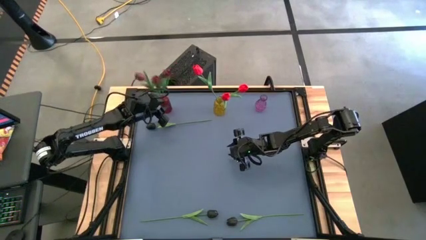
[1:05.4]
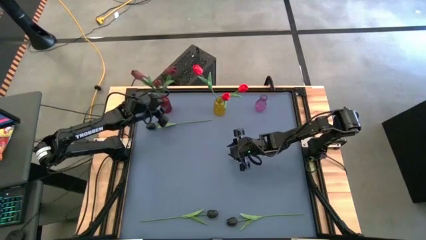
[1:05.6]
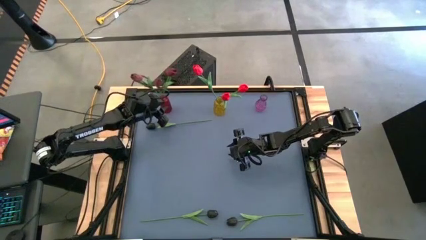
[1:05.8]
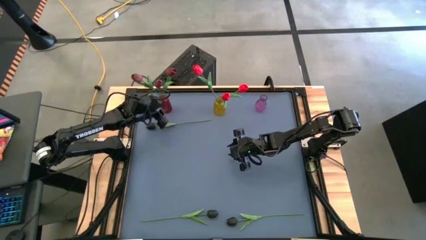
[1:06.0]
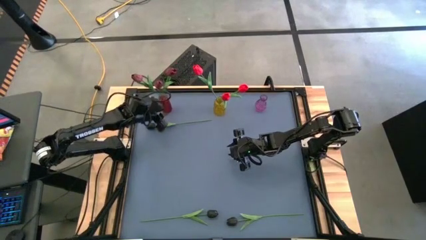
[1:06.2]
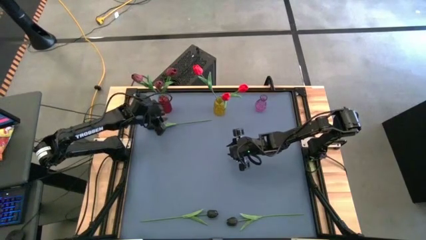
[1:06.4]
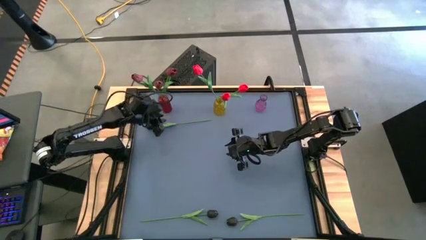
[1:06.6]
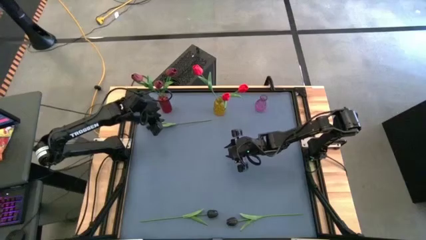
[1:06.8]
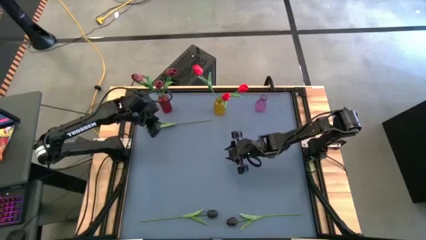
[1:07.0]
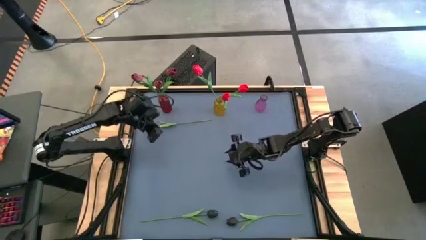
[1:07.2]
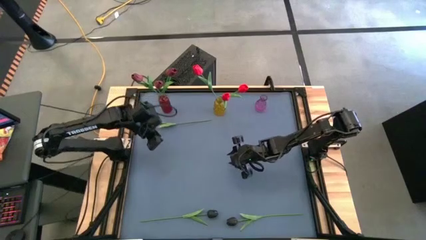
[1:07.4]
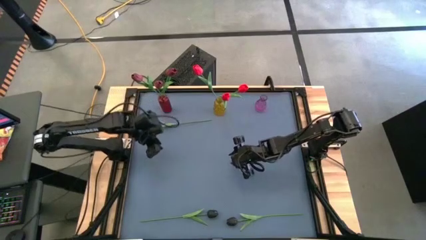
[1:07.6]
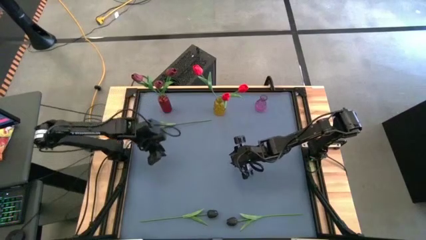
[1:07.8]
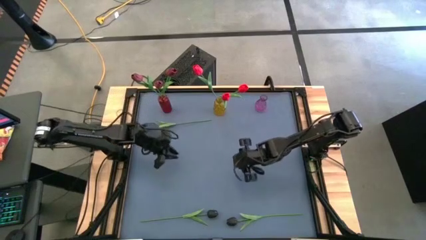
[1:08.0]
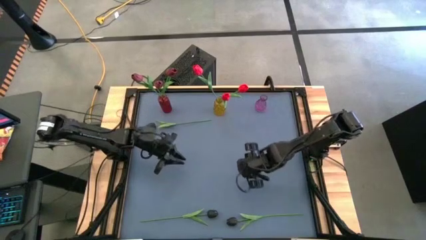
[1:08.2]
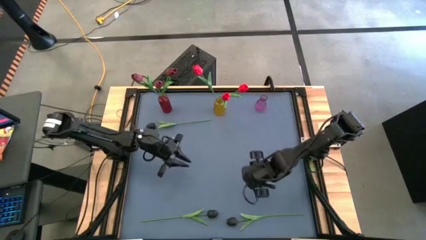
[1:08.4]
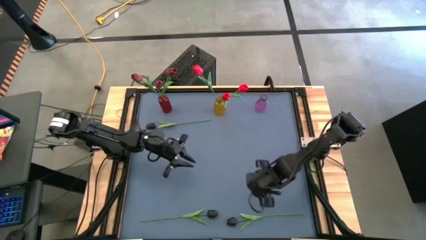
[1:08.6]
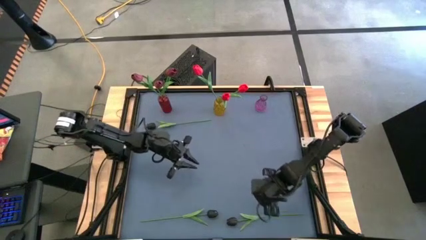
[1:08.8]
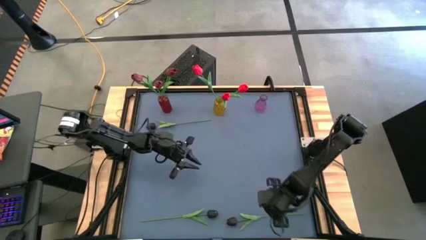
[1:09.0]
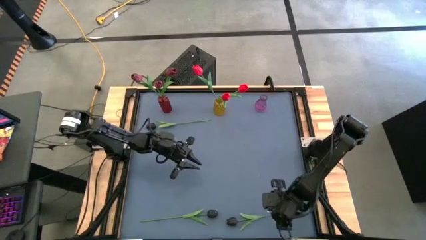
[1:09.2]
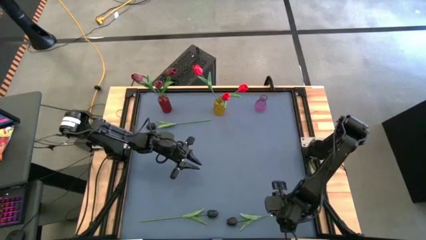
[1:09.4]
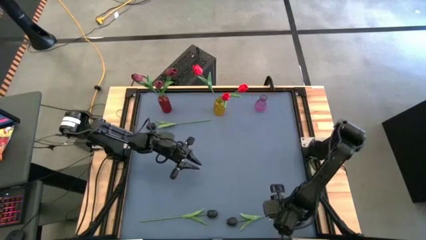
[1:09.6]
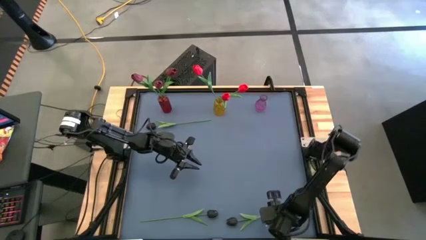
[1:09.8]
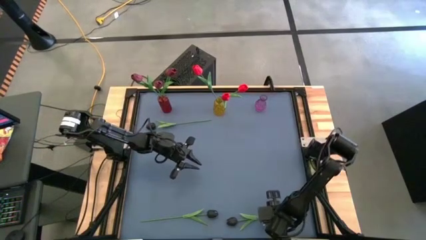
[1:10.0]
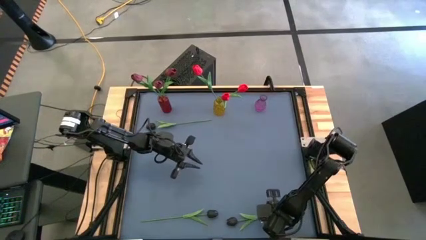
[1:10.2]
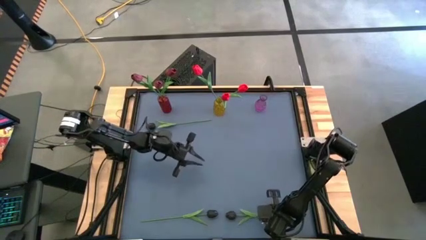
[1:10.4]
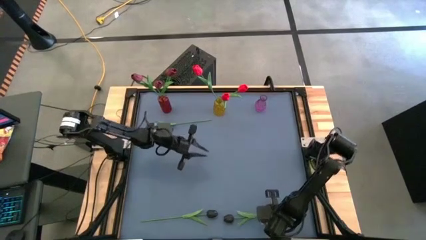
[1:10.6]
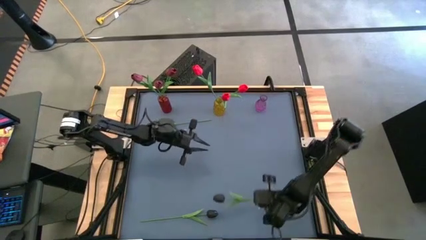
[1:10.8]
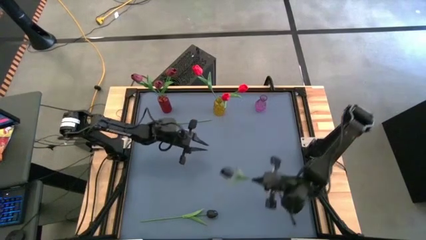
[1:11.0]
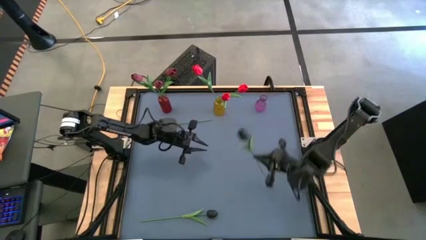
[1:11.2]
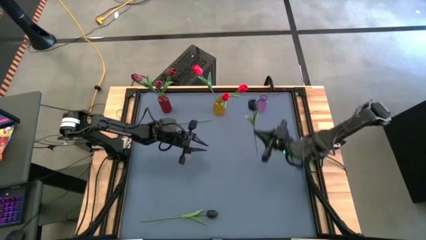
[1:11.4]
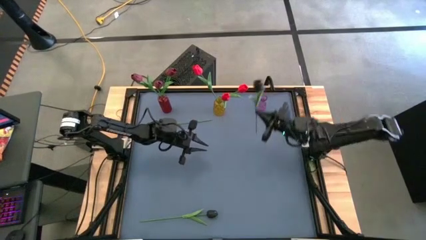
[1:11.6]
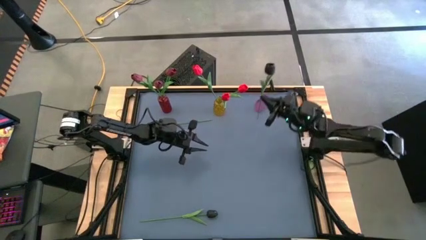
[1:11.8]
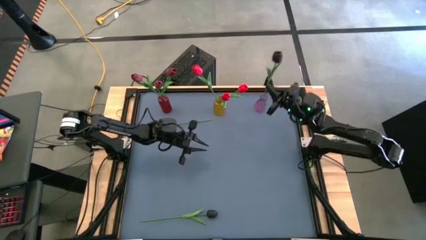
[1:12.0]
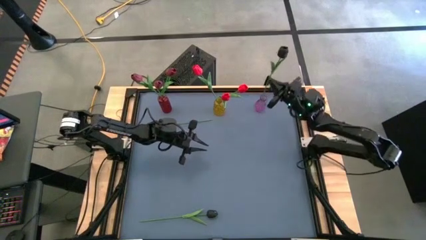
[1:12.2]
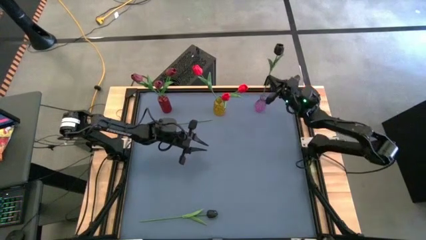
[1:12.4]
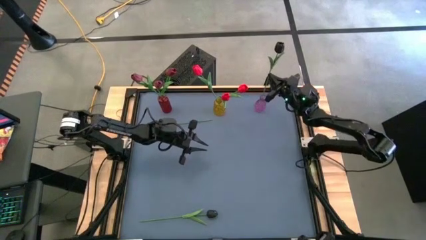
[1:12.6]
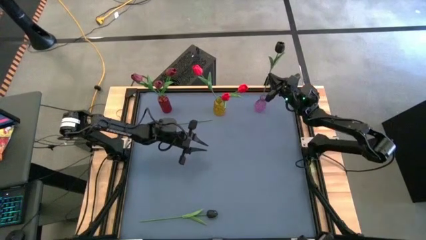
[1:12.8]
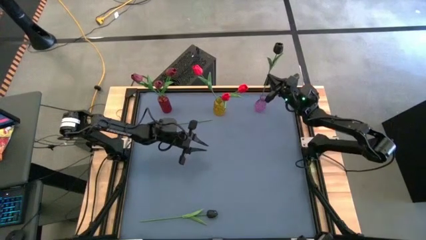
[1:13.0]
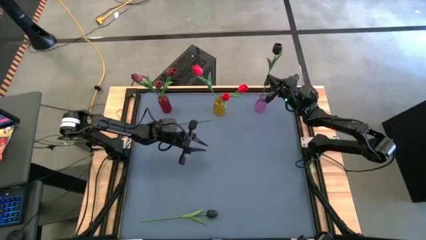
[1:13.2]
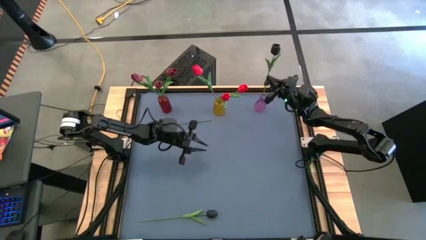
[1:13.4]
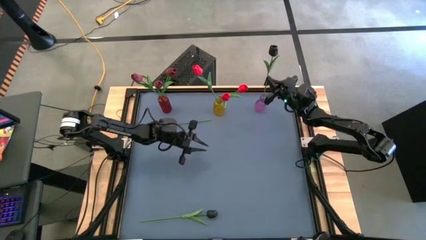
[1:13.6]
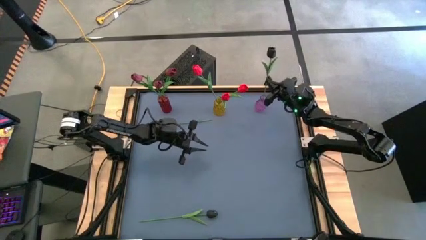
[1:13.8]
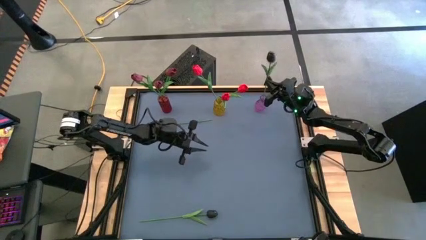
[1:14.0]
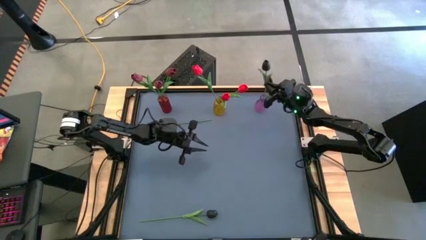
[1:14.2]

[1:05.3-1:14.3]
Task: Sort flowers into vase by color
Put the bottom right black tulip into the purple vase

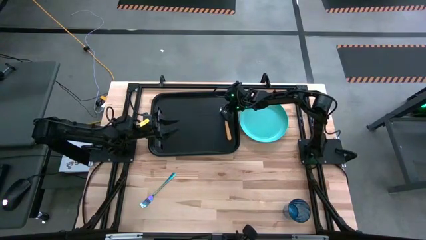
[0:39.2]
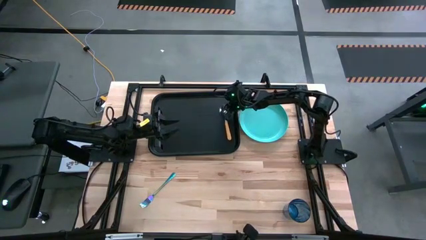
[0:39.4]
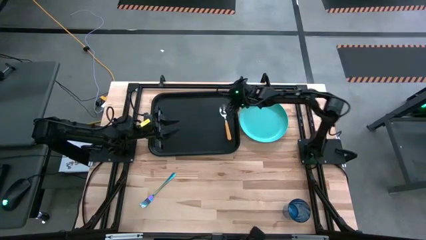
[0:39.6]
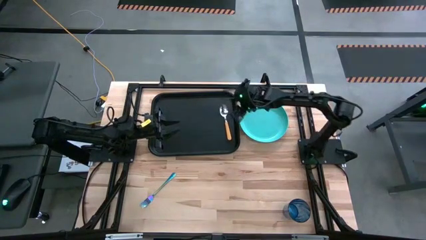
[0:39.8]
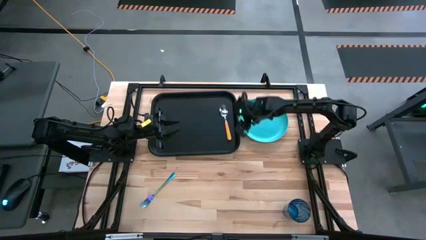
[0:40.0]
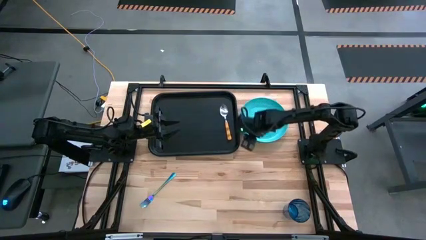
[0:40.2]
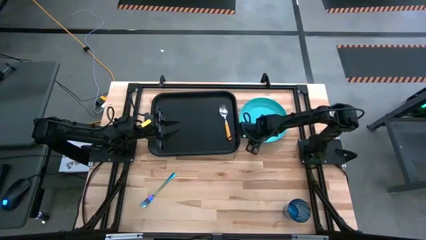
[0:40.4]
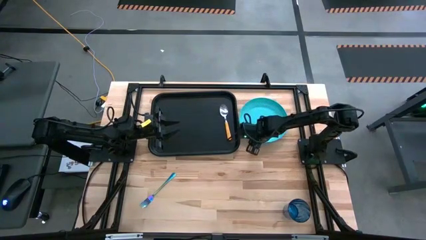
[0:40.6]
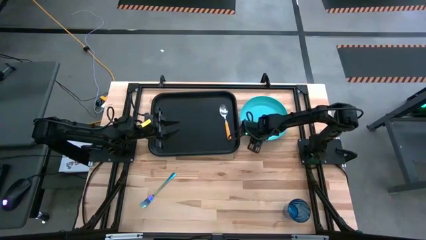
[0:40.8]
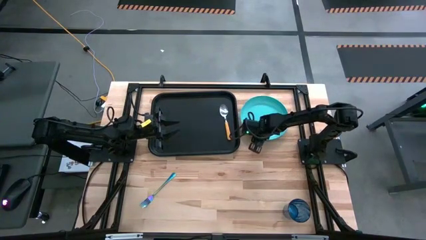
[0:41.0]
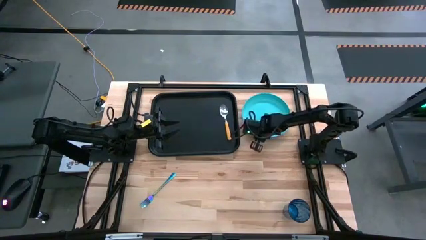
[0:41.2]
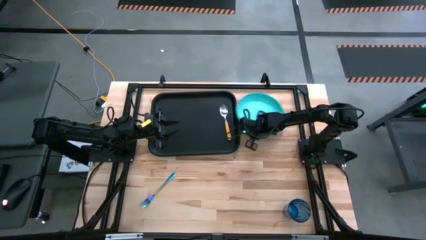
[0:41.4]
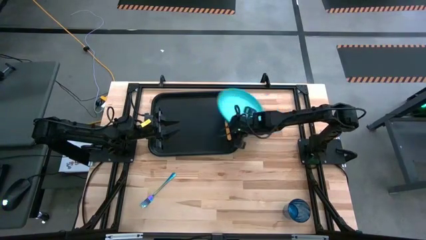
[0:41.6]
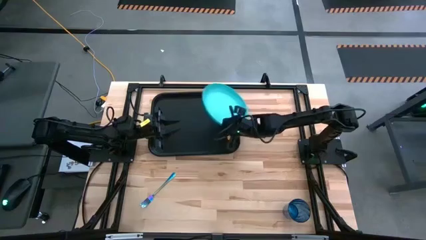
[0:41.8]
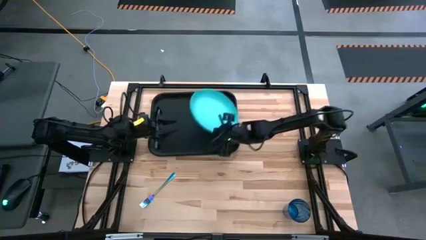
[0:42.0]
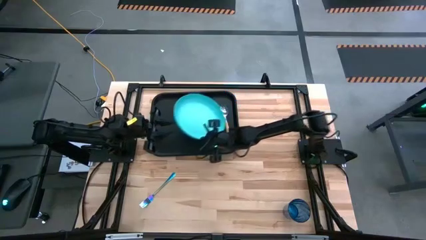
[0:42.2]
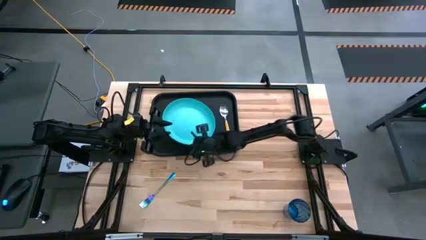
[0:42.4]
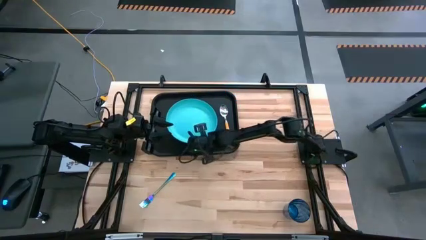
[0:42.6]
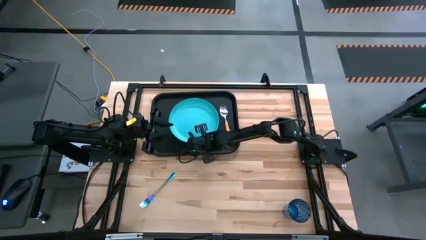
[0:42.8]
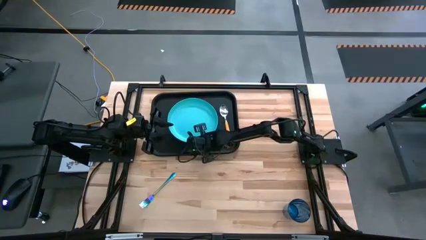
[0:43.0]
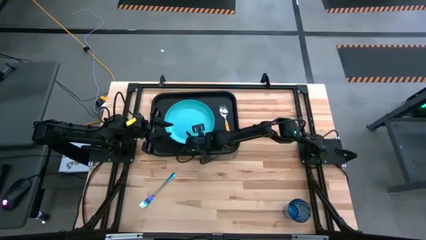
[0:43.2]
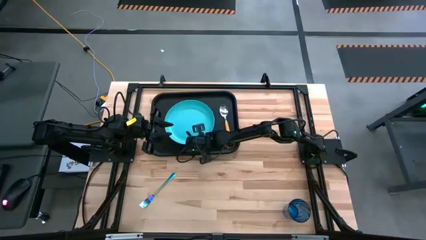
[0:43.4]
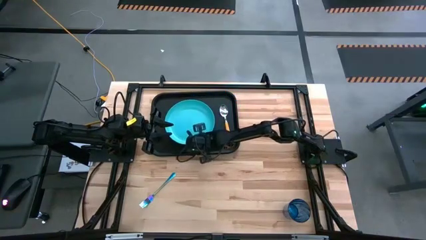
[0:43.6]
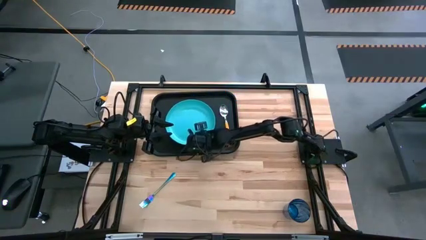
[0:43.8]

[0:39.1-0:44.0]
Task: Pick and place plate/cup/fork/spoon on tray
Put the blue plate on the black serving tray to the left of the yellow spoon
